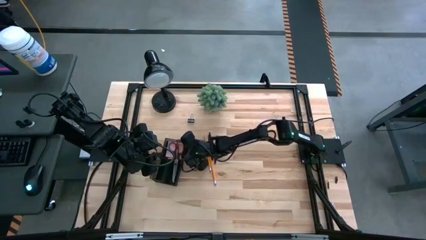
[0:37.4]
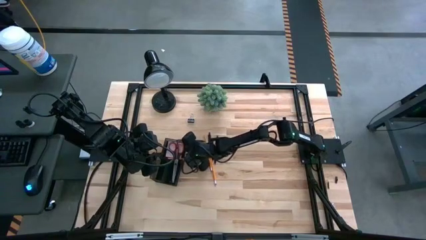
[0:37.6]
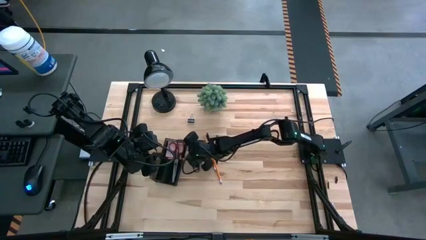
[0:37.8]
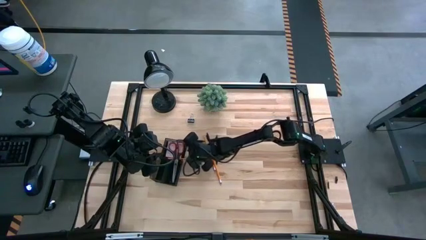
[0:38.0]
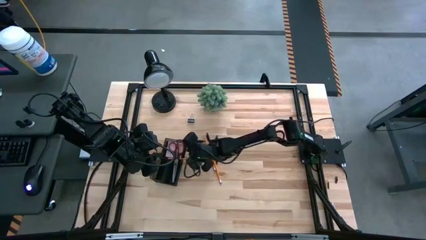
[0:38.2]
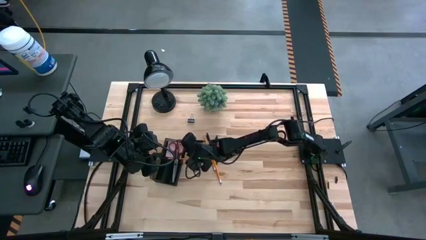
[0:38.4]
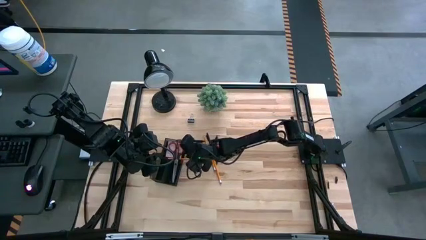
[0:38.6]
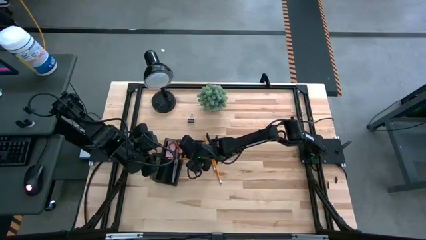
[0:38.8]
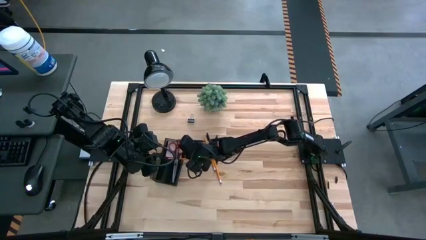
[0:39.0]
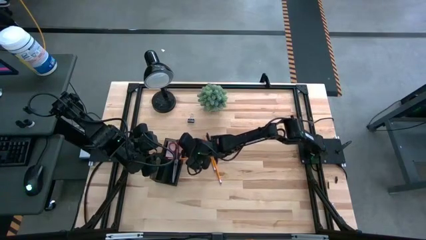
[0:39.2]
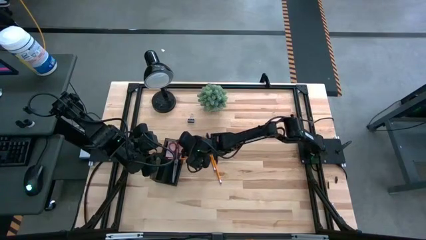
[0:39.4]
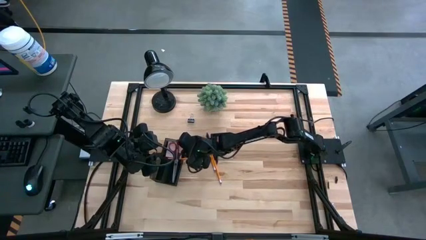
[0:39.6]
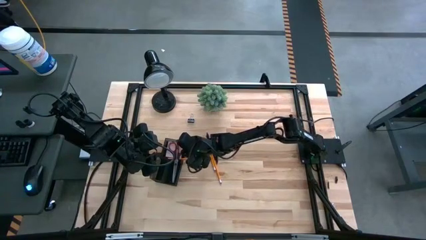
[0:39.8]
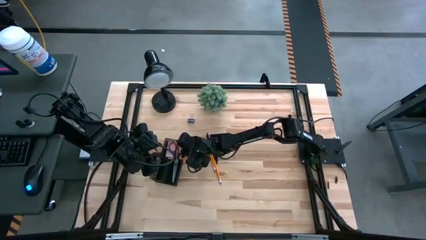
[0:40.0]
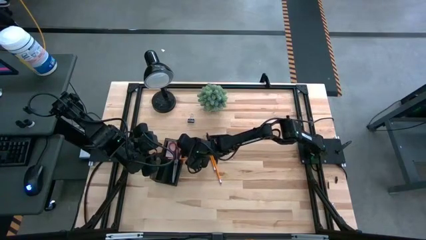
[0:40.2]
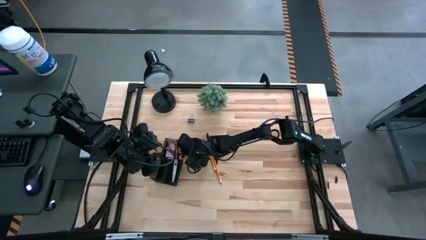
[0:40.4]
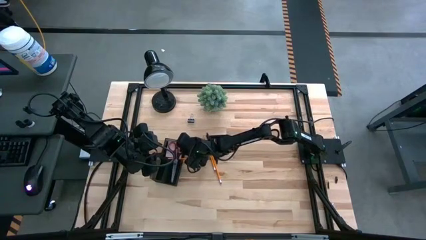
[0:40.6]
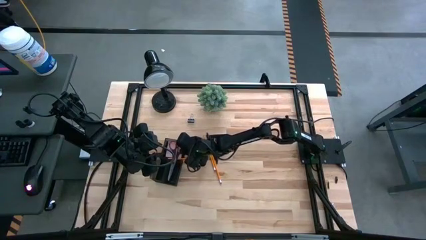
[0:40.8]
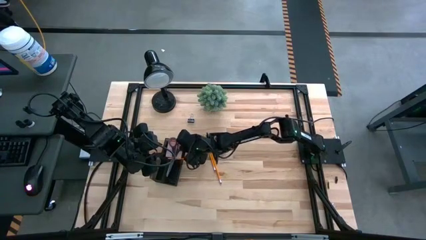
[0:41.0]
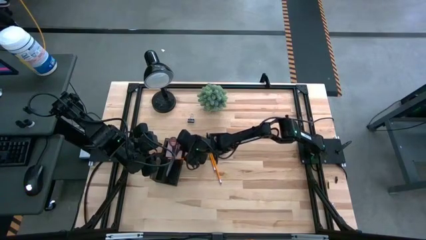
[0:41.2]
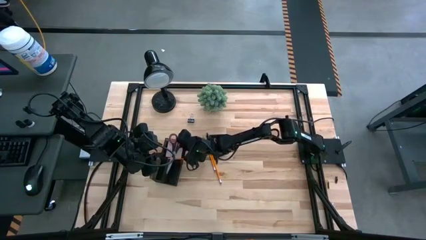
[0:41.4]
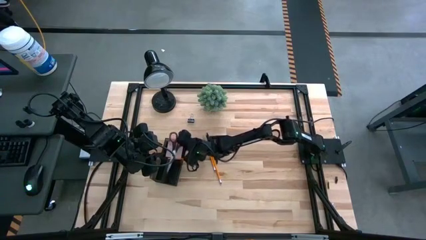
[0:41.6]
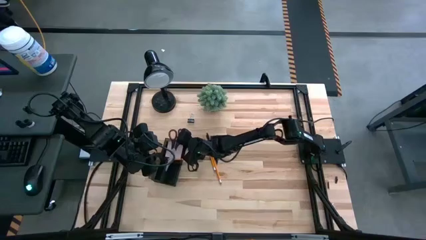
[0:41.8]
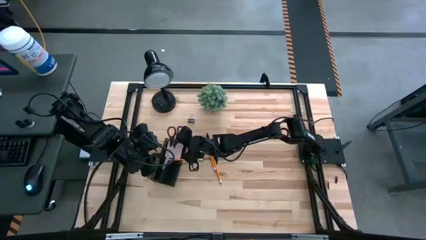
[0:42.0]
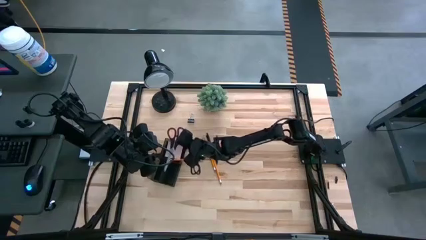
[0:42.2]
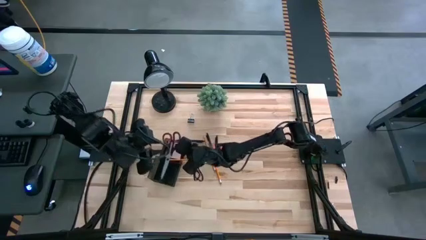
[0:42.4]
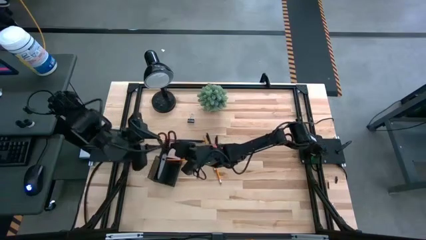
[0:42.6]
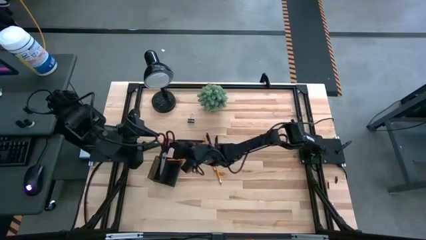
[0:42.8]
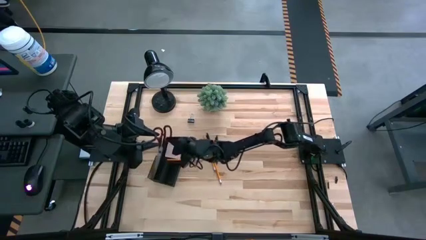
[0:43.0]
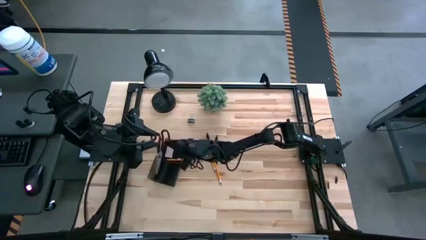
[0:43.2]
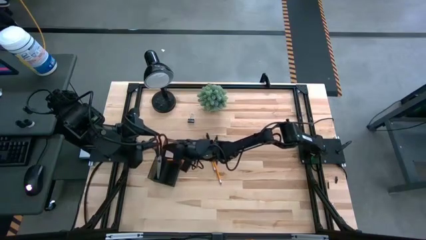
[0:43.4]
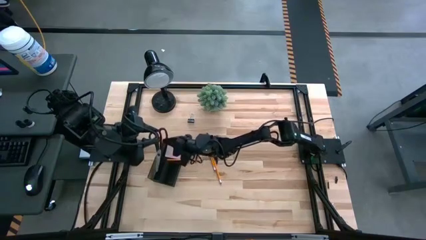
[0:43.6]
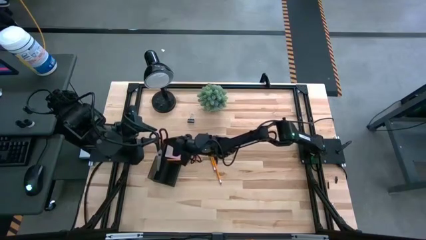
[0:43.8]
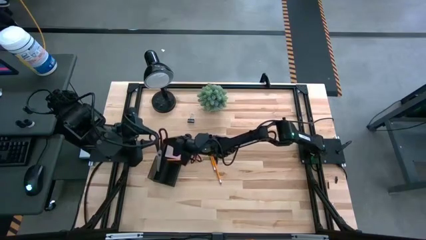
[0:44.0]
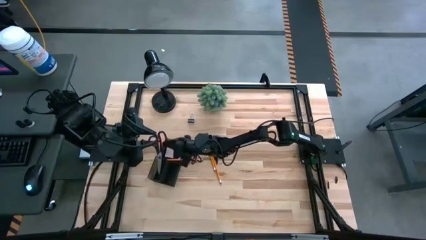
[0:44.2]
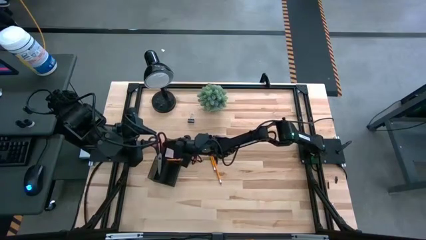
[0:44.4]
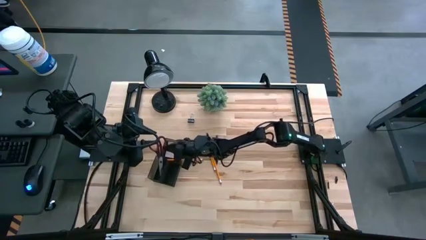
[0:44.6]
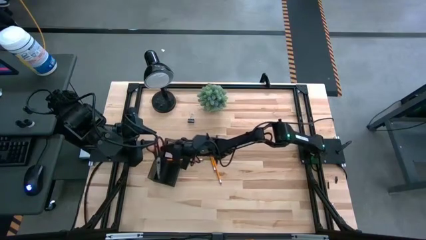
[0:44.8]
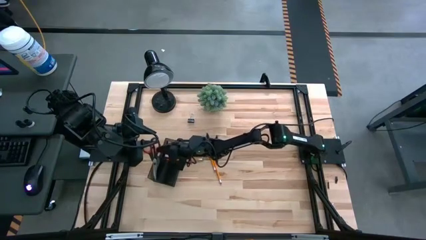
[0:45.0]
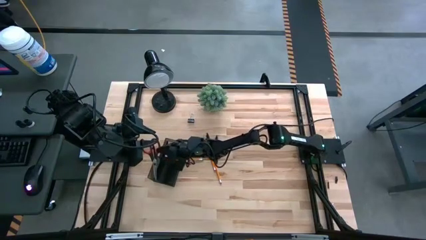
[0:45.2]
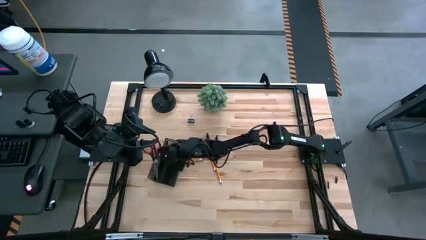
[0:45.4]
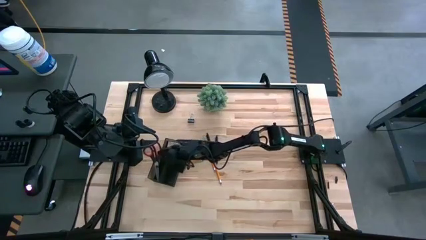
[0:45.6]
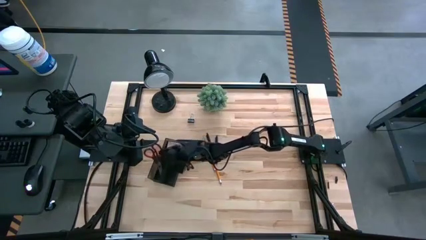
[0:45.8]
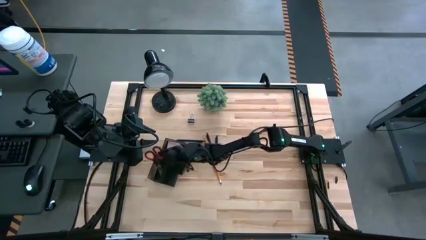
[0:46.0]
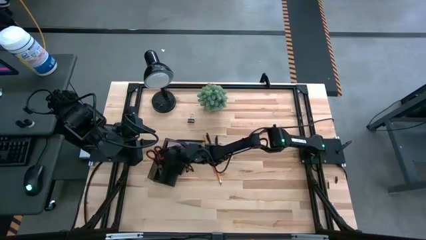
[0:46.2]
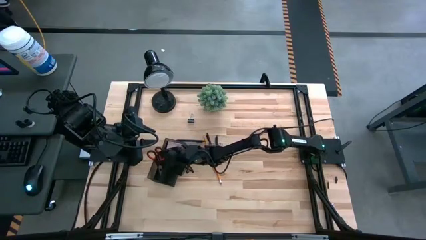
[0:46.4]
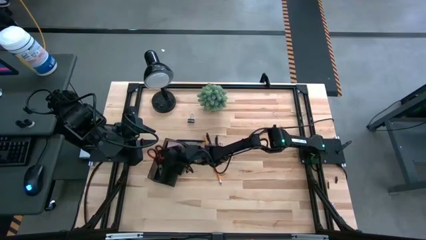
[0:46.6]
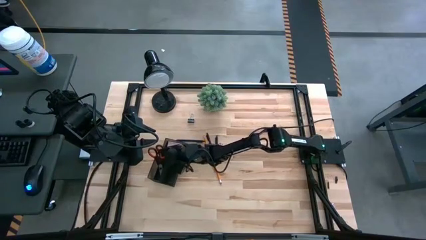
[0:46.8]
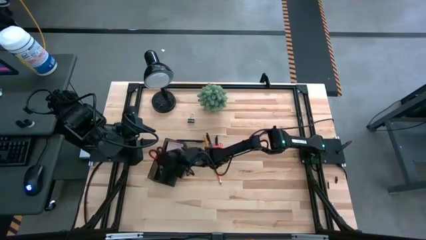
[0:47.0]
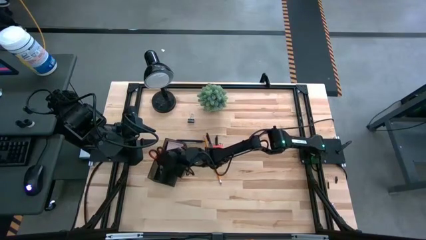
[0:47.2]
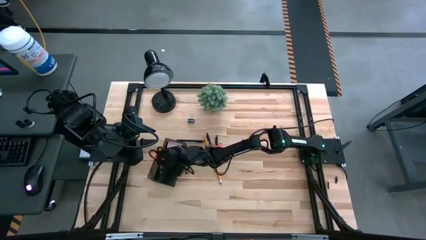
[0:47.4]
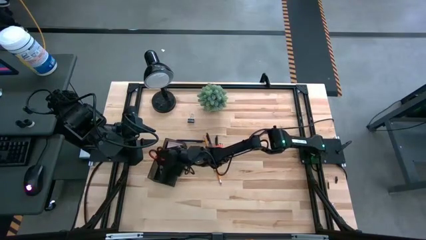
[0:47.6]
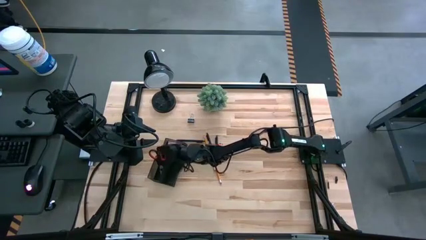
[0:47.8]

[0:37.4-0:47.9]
Task: Pick and place office supplies into organizer
Put the black scissors into the desk organizer

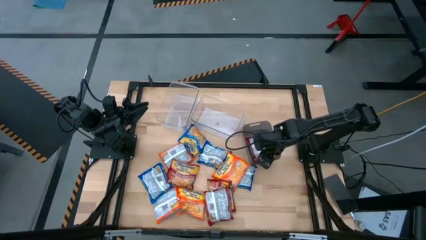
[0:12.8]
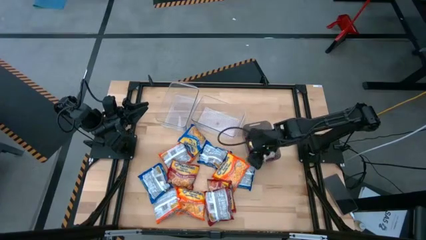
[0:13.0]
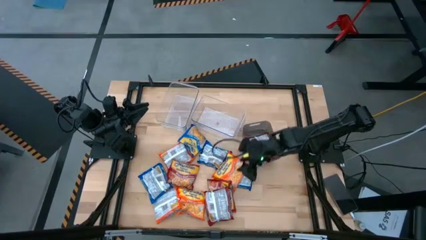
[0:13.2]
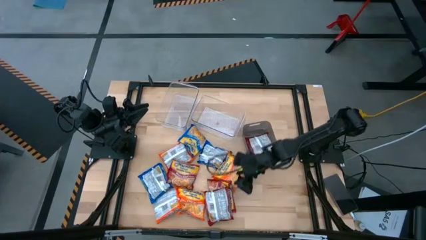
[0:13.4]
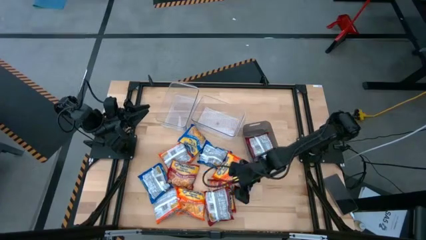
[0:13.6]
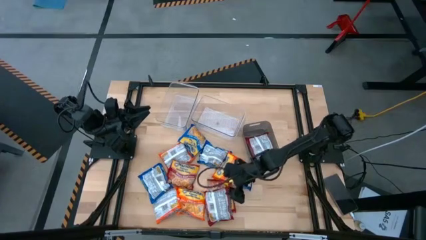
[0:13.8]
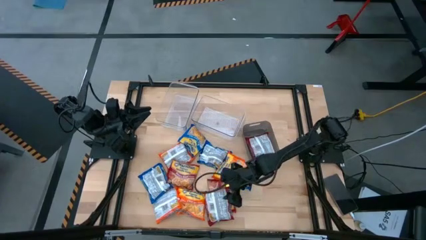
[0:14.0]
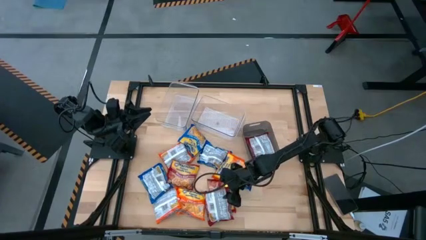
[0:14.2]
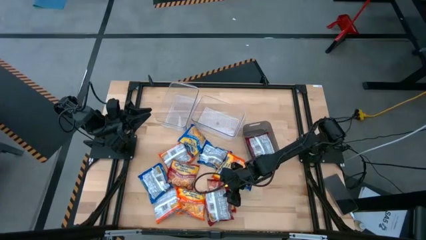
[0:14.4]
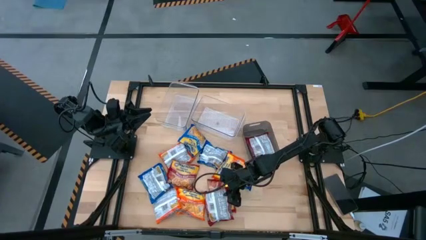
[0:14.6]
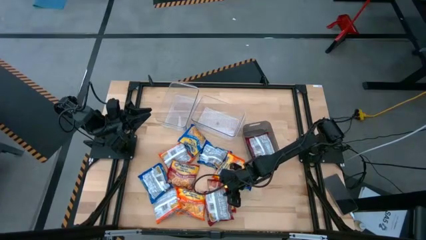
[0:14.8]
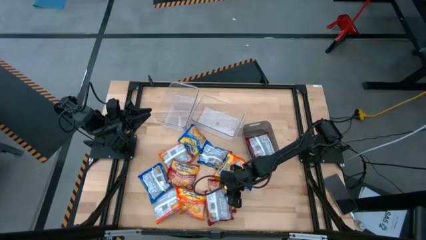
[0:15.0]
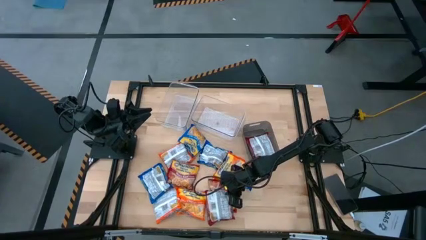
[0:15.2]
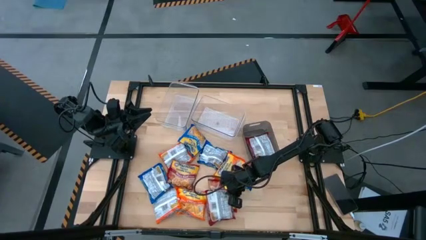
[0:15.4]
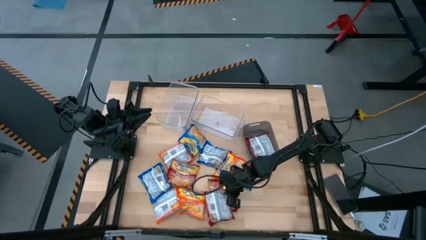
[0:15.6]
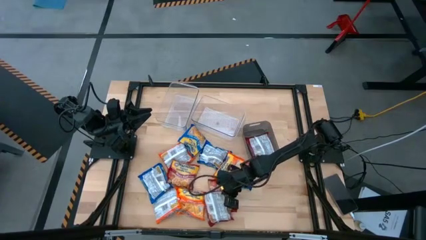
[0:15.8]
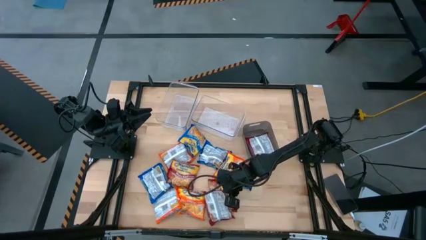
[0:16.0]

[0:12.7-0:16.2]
Task: Sort Maruchan noodles
Put the red noodle pack into the black bin

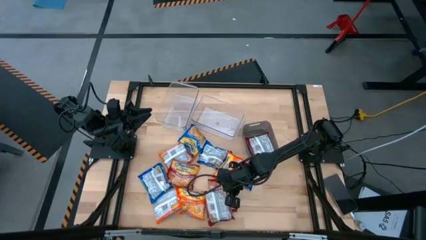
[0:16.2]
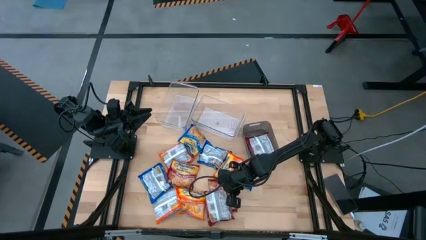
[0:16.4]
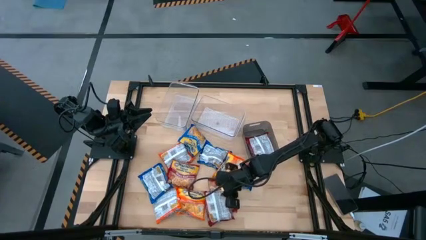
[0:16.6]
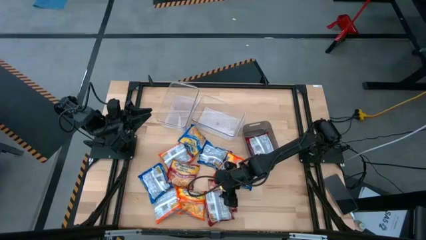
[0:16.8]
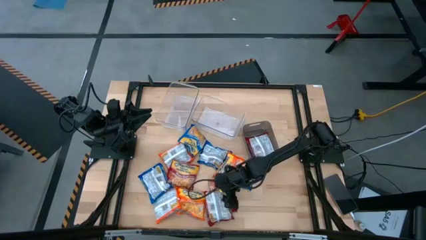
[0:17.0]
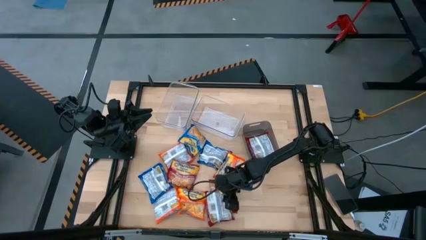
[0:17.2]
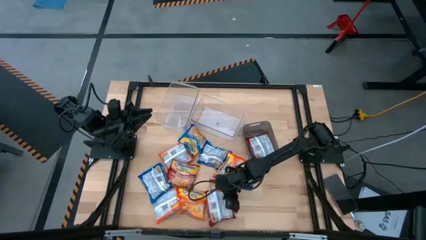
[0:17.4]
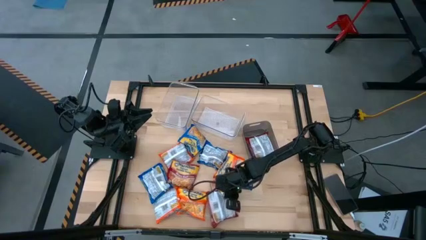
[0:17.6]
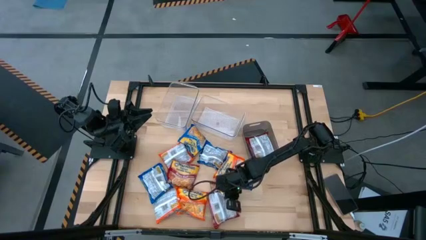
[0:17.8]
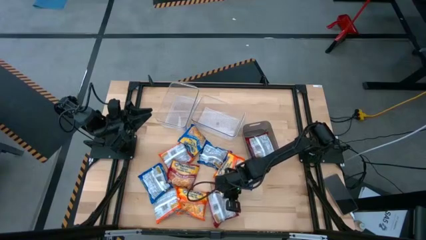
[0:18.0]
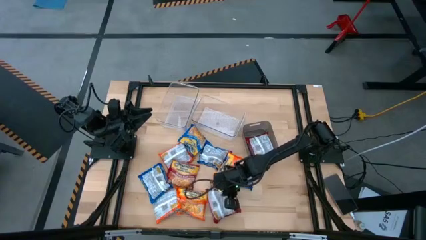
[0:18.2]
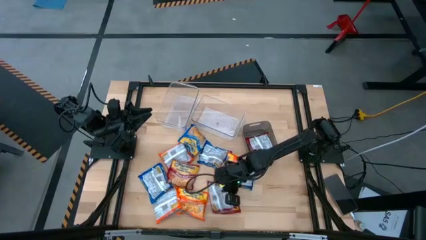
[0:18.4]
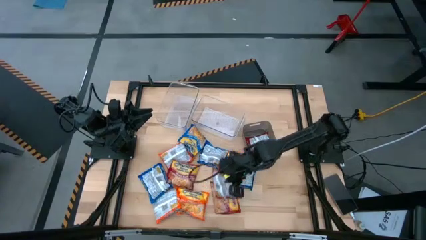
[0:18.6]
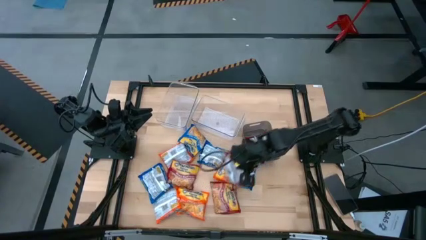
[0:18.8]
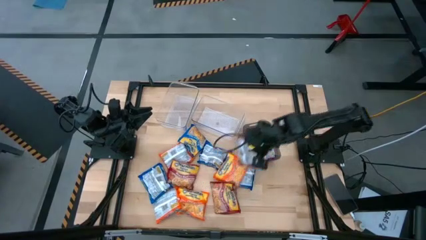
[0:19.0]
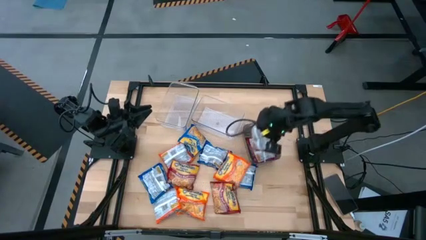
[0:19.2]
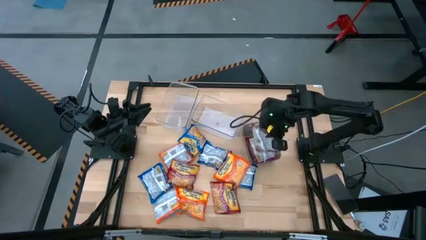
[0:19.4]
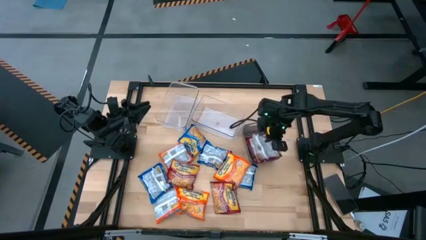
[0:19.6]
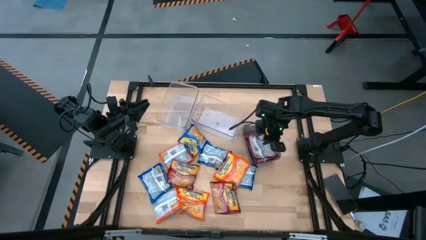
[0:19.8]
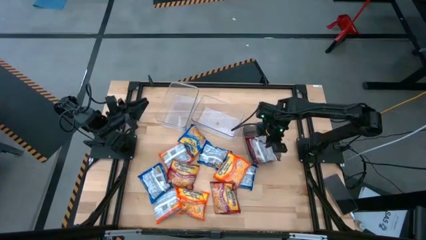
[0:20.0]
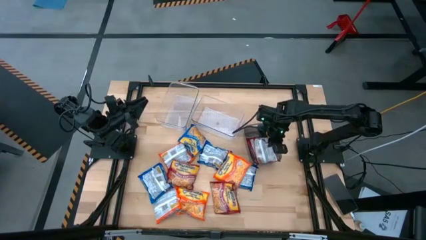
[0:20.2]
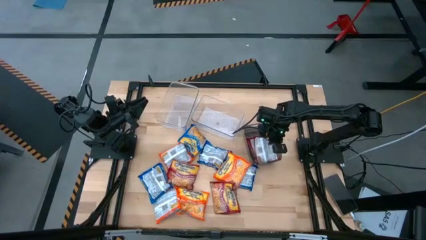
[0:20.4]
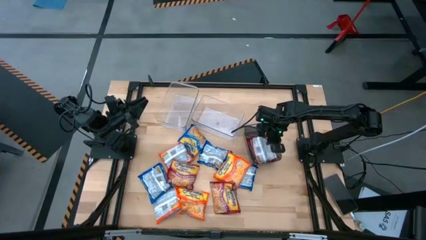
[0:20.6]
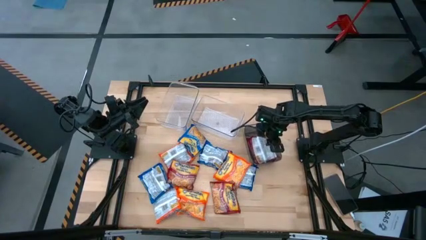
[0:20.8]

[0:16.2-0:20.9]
Put the red noodle pack into the black bin
